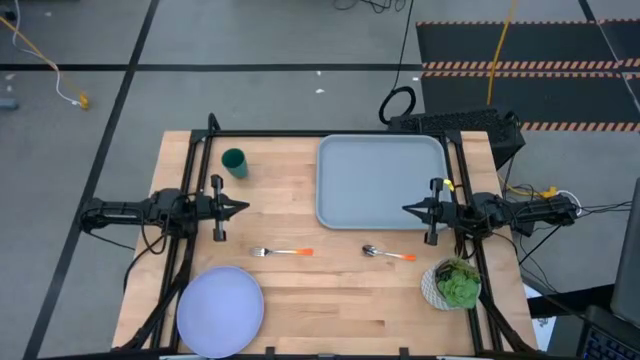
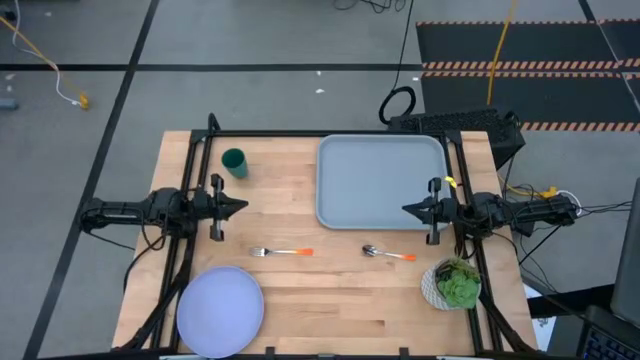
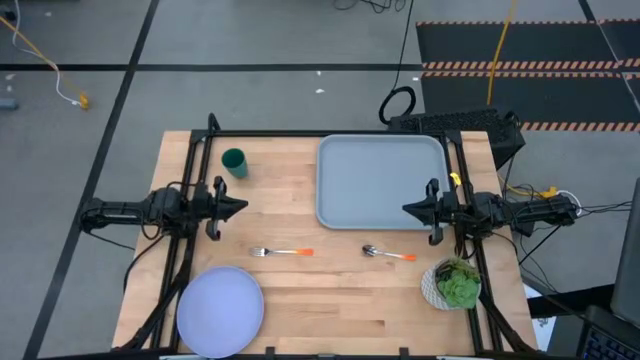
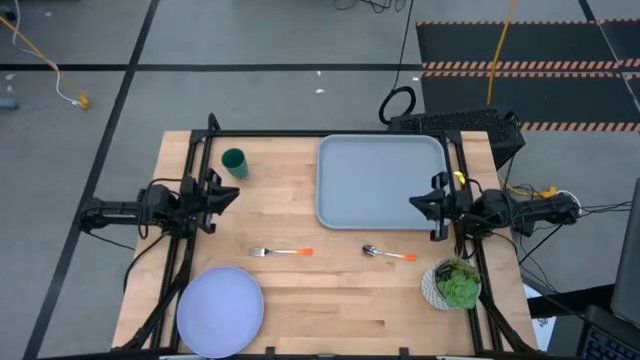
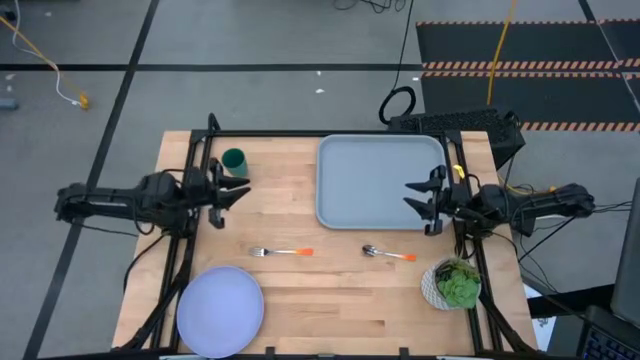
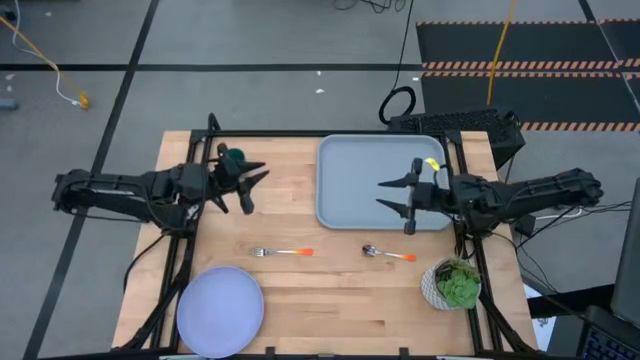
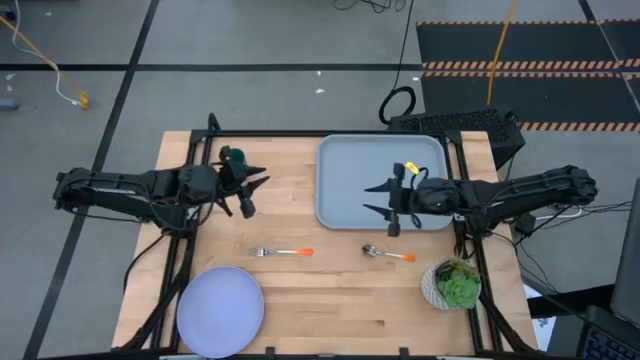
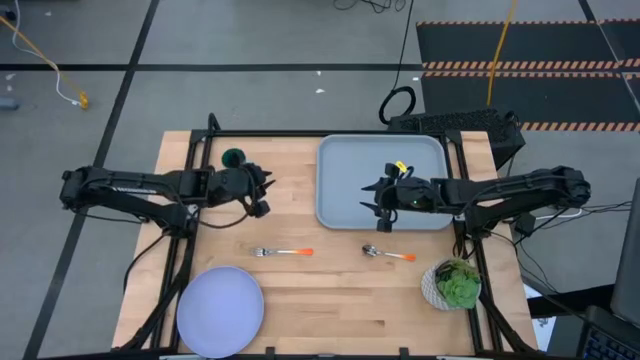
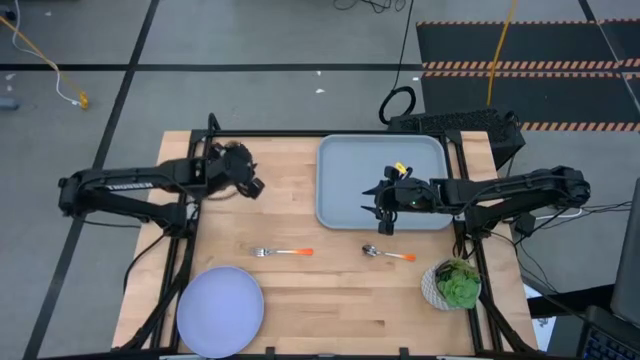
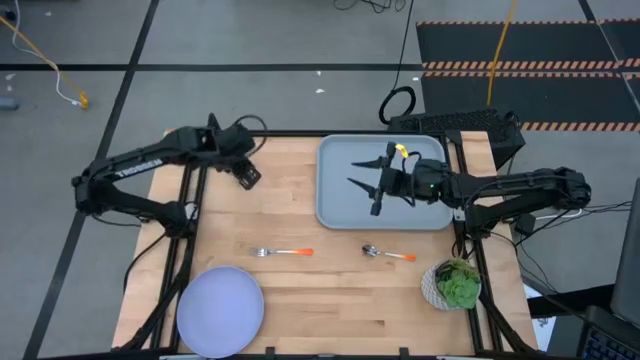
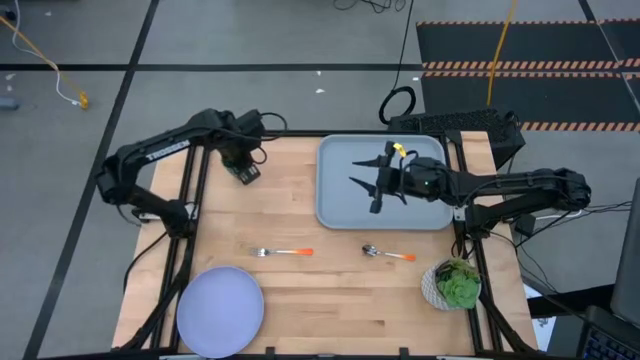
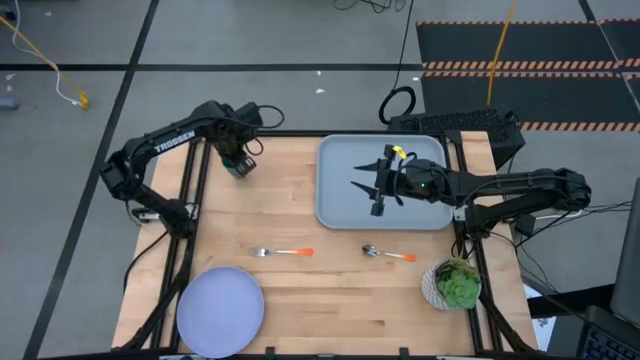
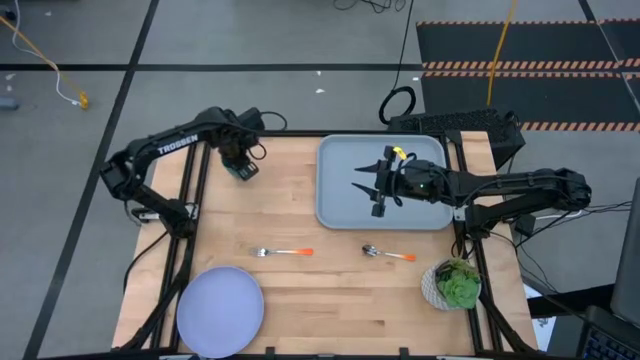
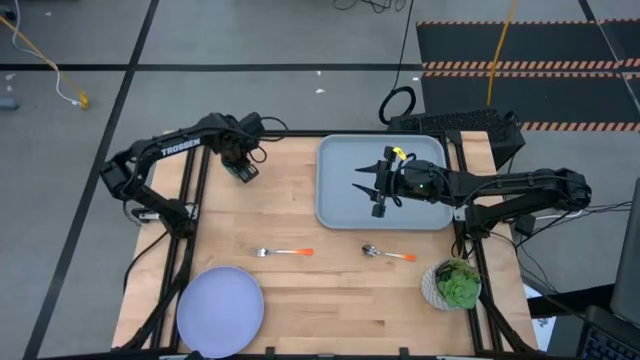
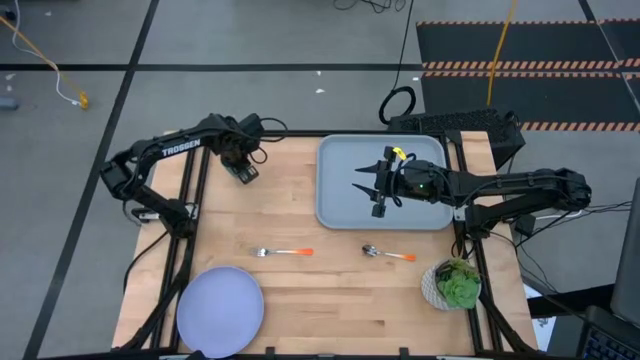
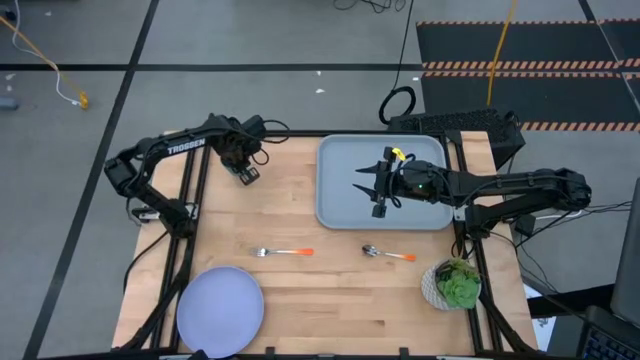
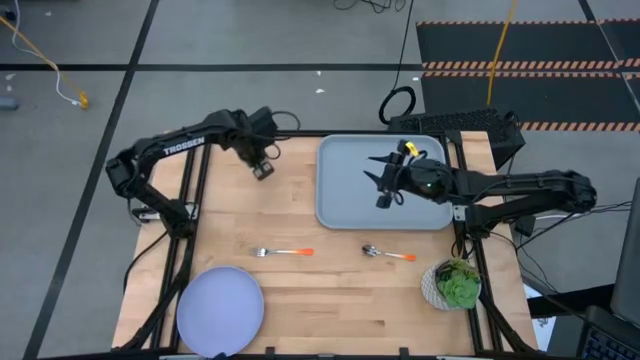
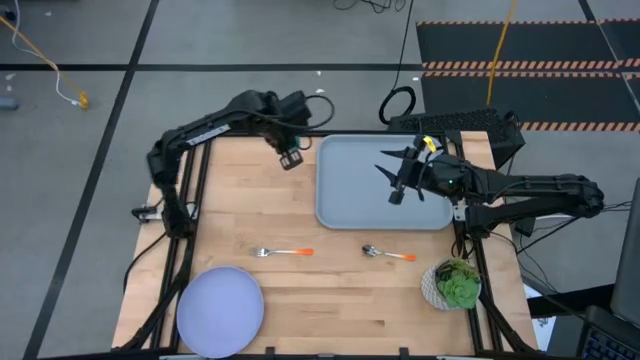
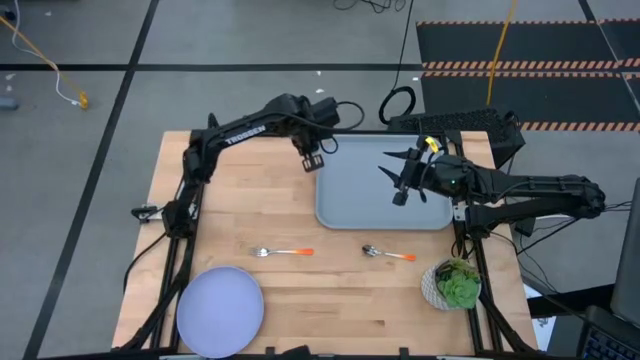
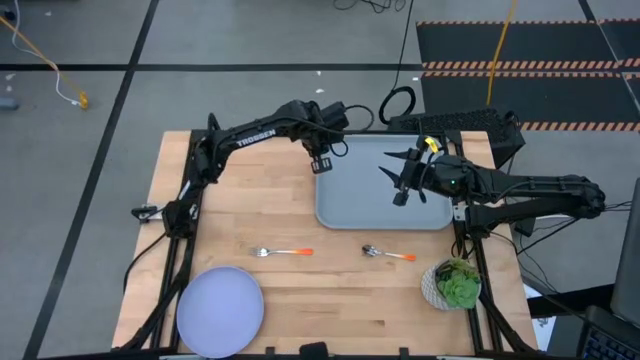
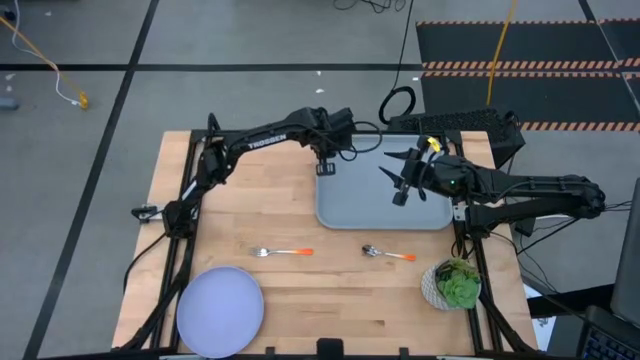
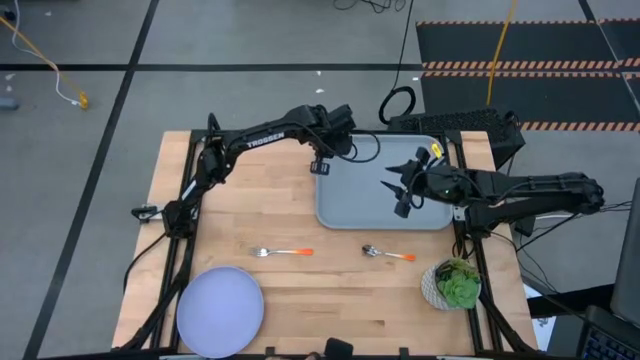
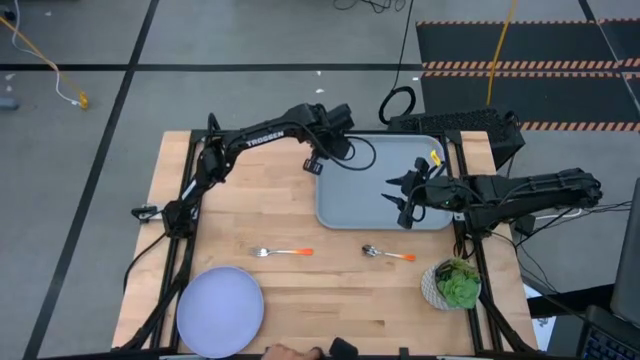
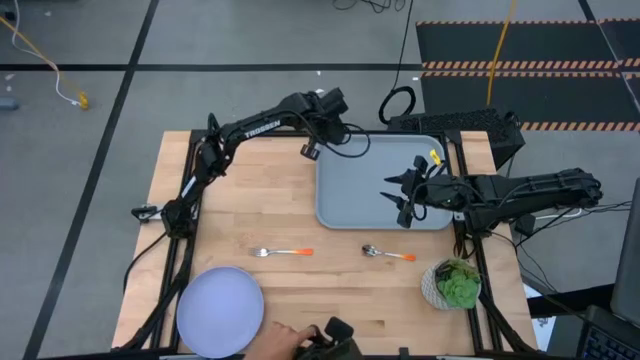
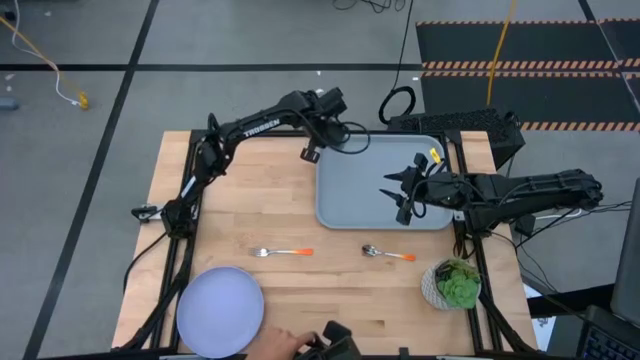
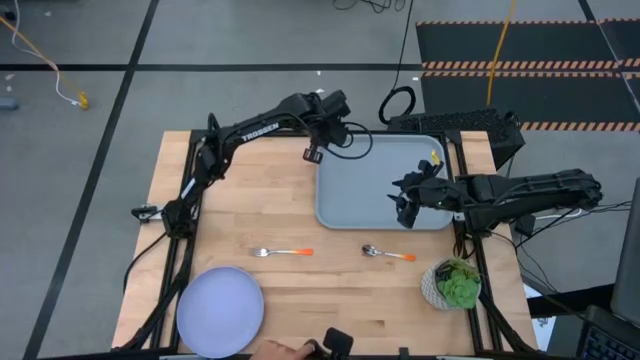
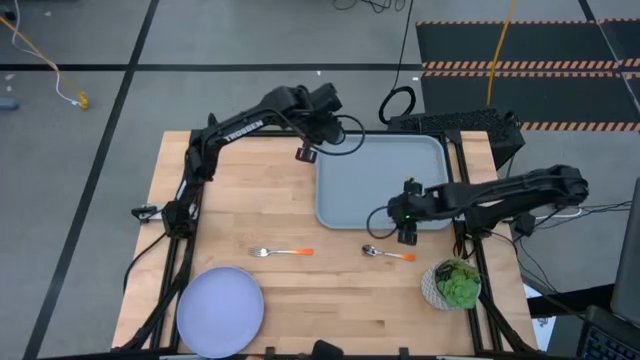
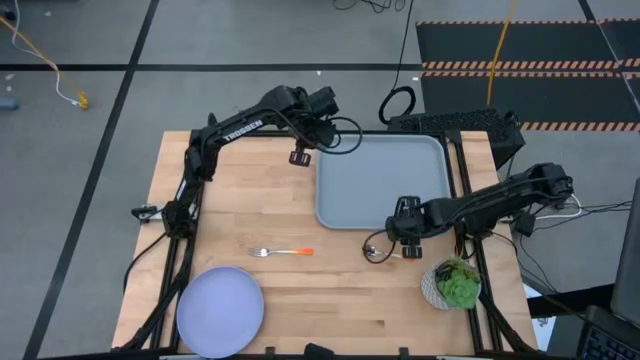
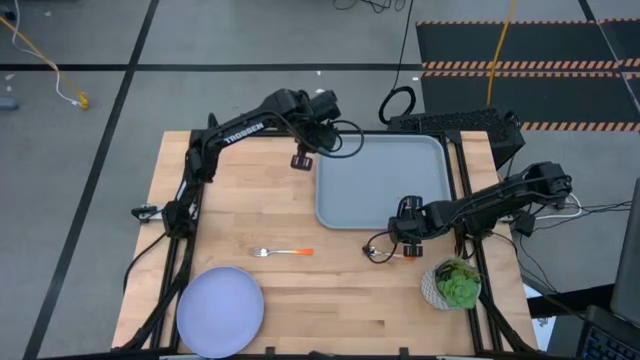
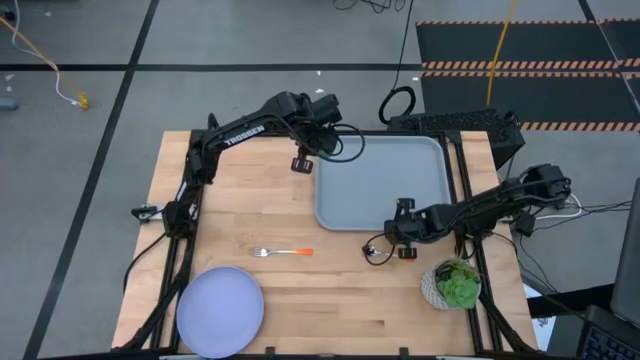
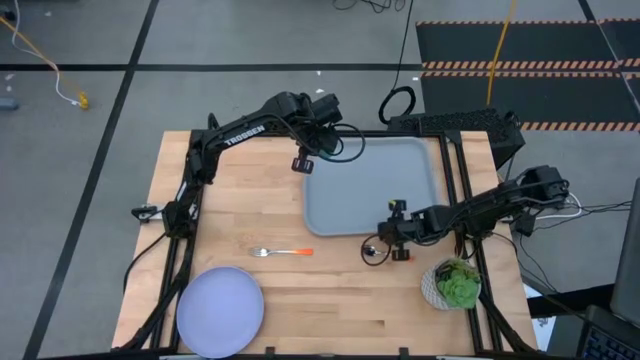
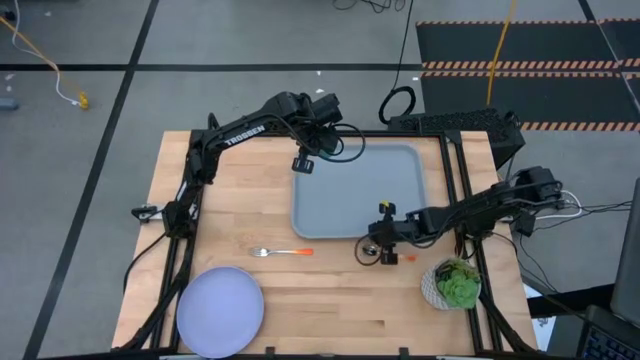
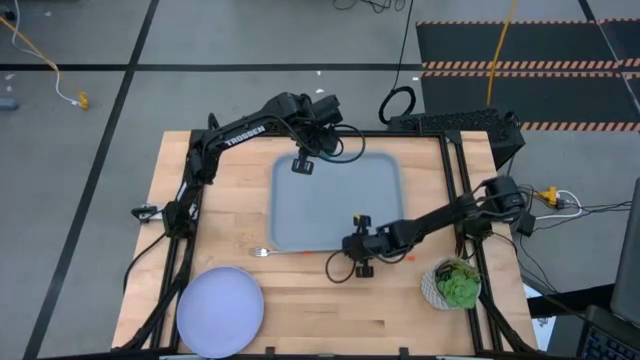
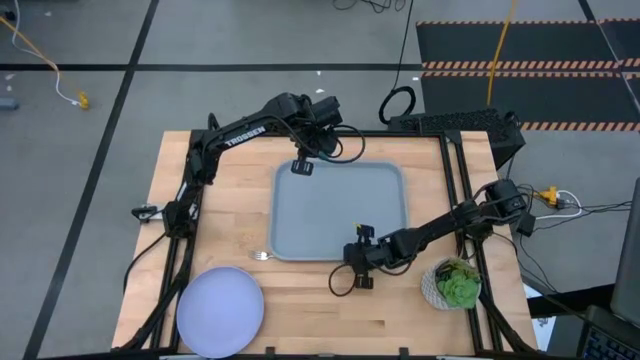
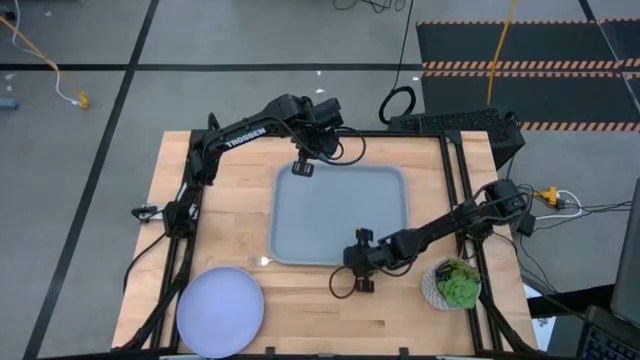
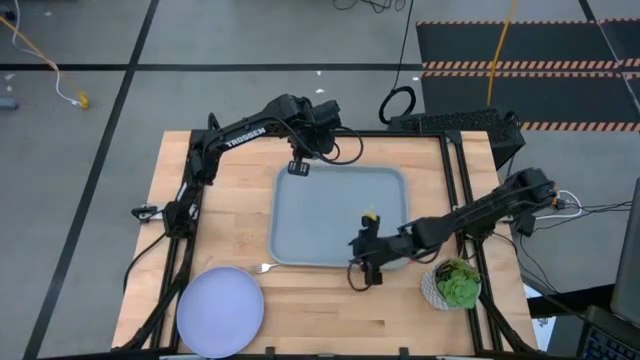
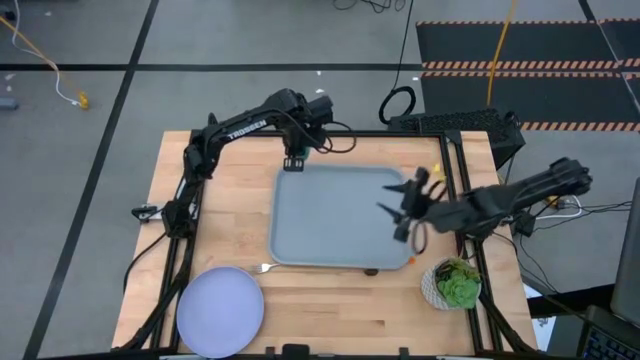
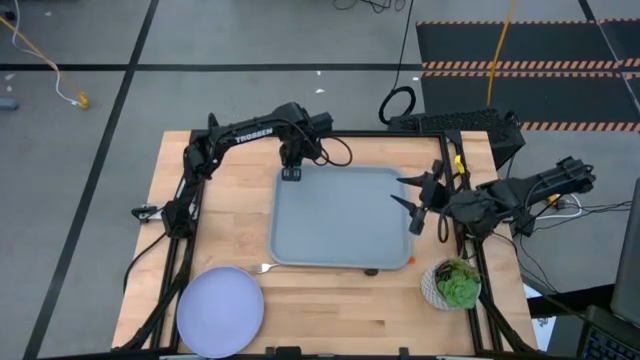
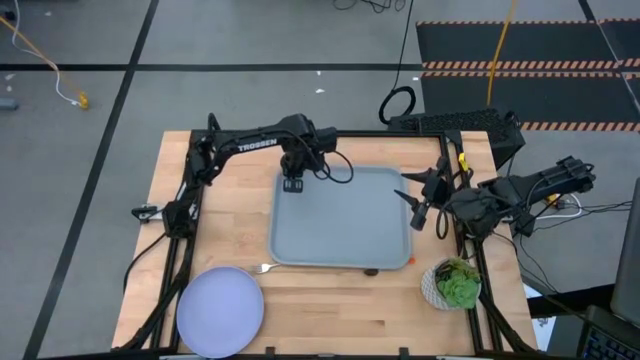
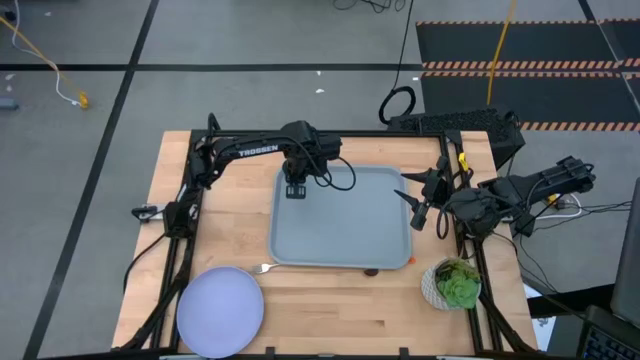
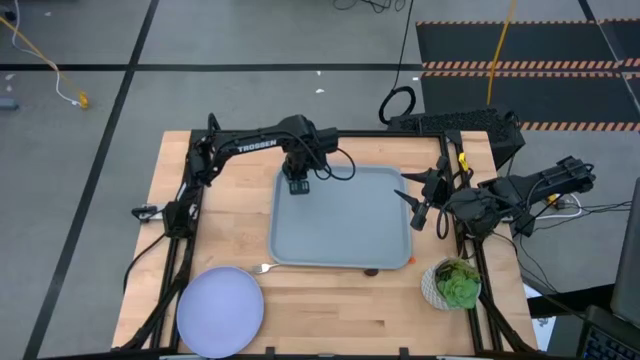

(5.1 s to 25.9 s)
Task: Pick and place plate/cup/fork/spoon on tray
Put the green cup on the gray serving tray
